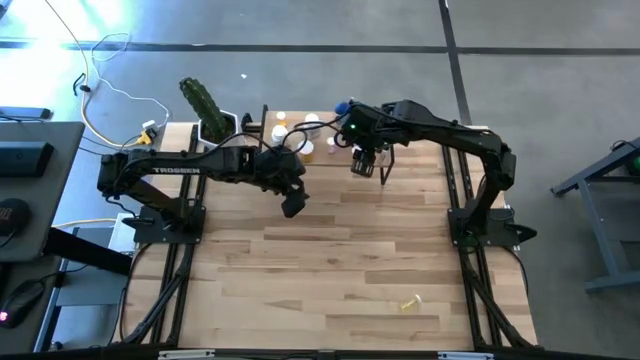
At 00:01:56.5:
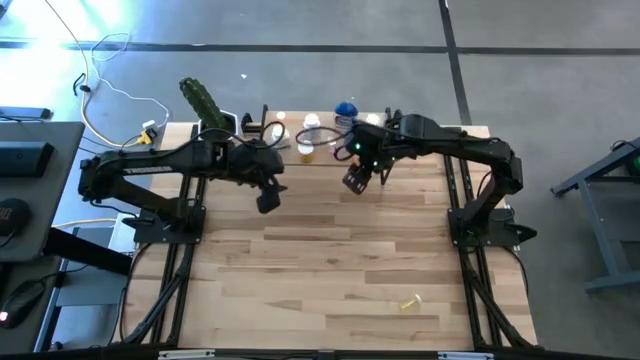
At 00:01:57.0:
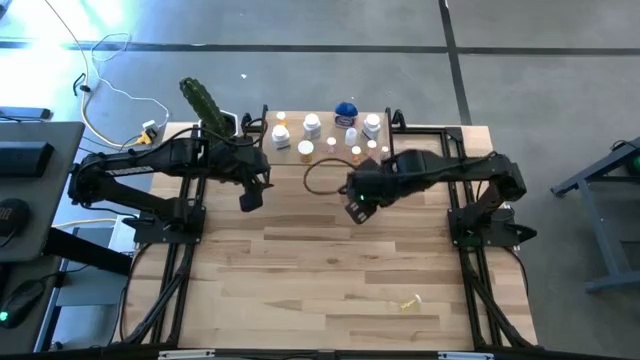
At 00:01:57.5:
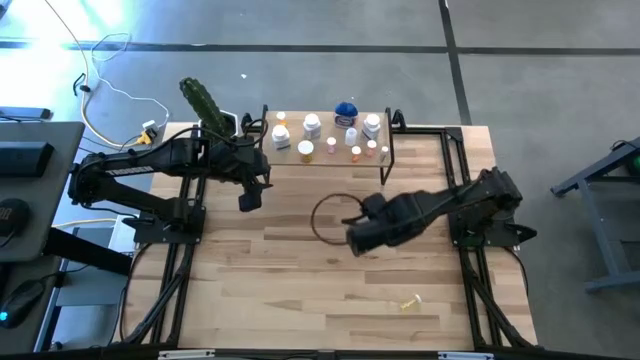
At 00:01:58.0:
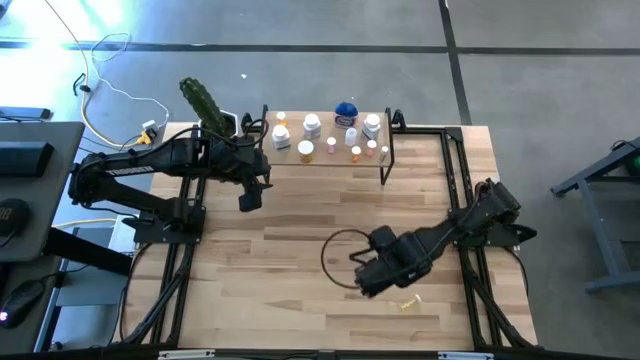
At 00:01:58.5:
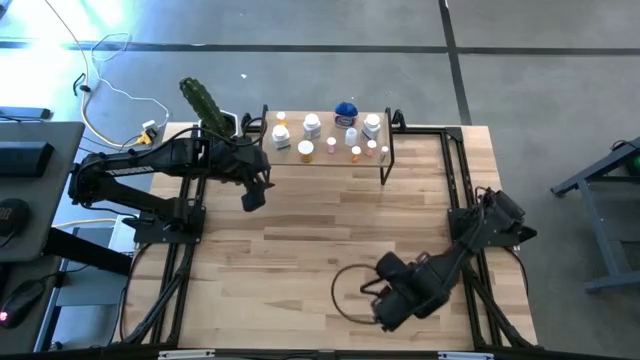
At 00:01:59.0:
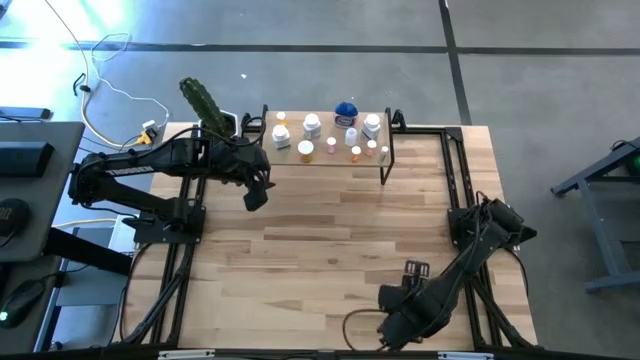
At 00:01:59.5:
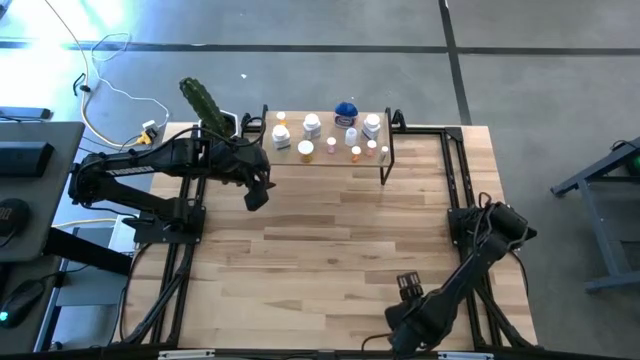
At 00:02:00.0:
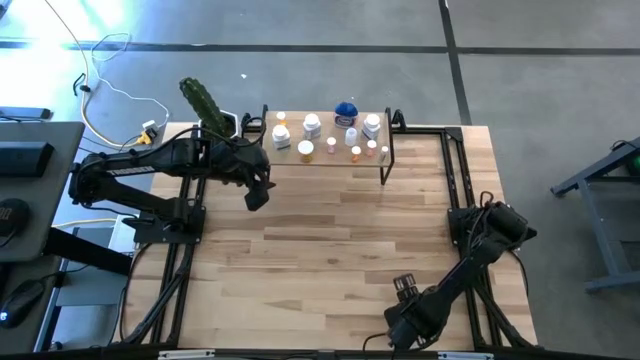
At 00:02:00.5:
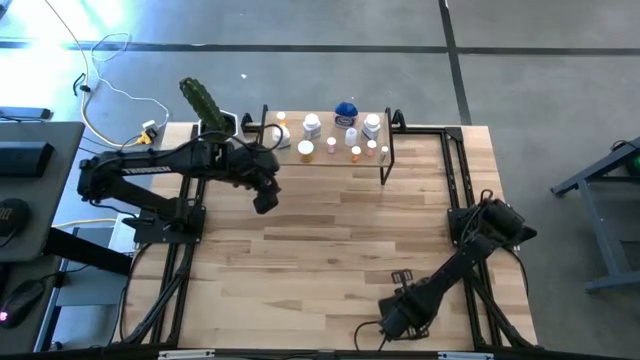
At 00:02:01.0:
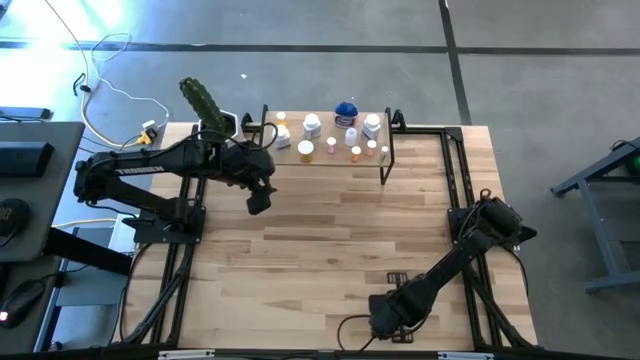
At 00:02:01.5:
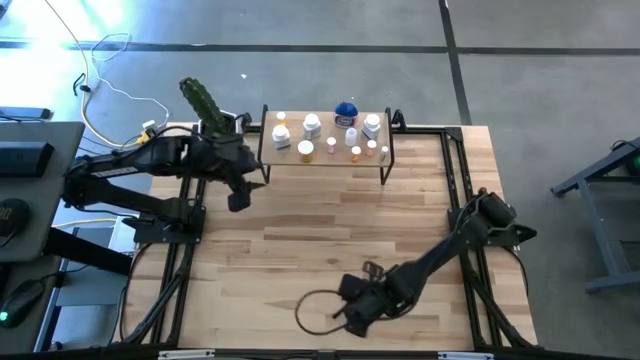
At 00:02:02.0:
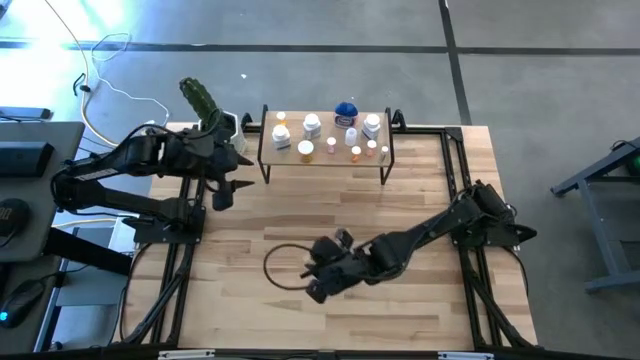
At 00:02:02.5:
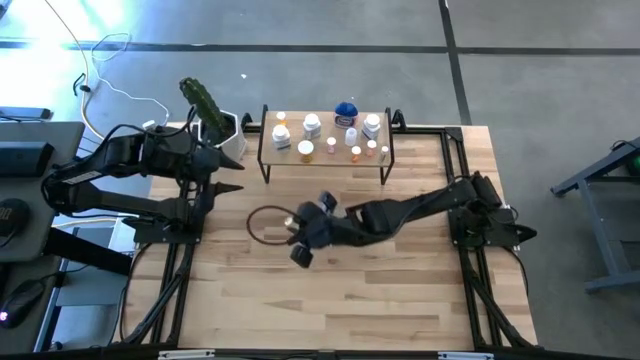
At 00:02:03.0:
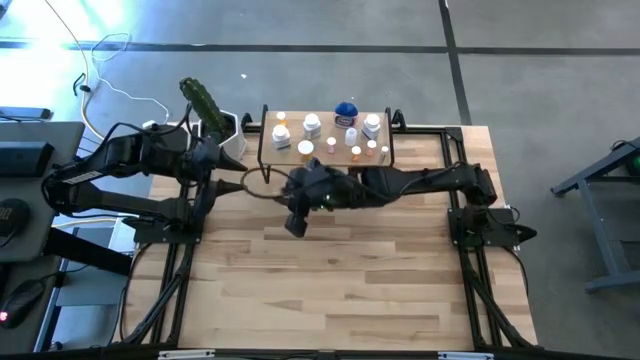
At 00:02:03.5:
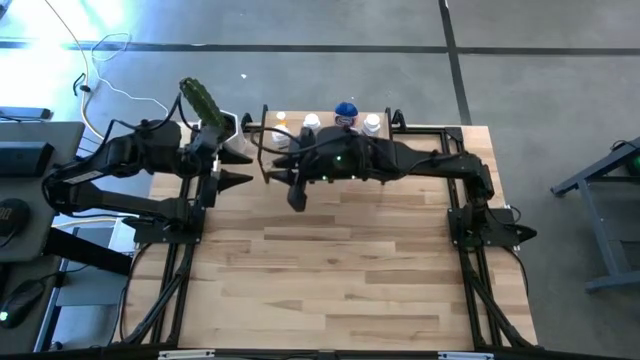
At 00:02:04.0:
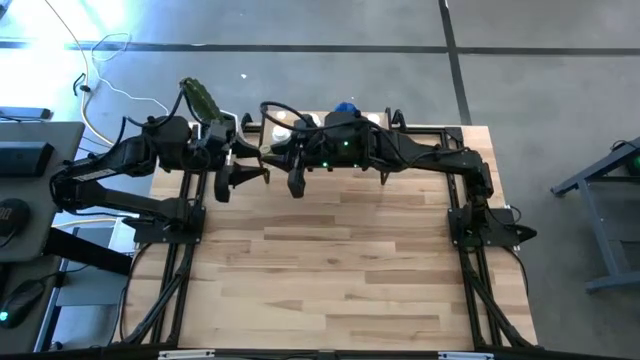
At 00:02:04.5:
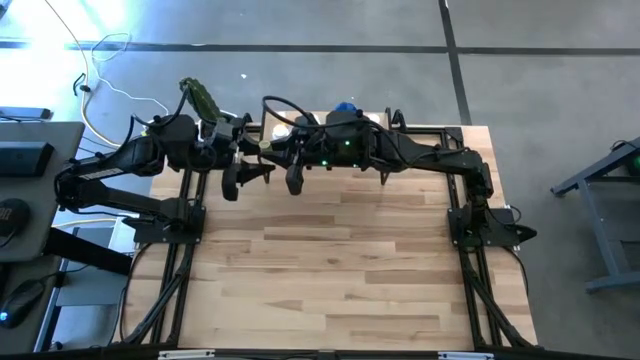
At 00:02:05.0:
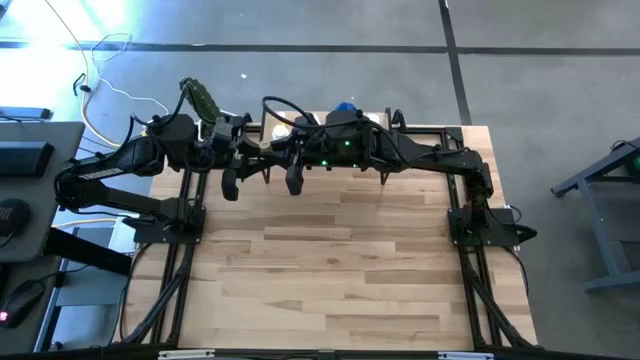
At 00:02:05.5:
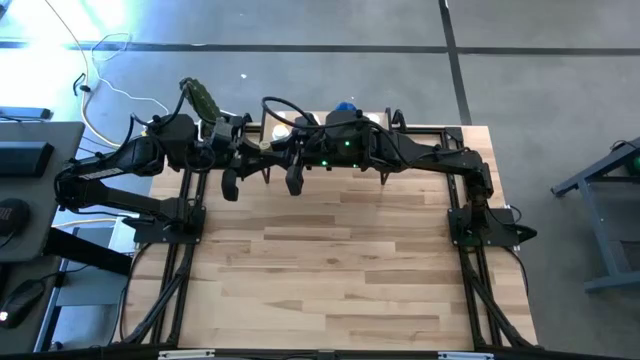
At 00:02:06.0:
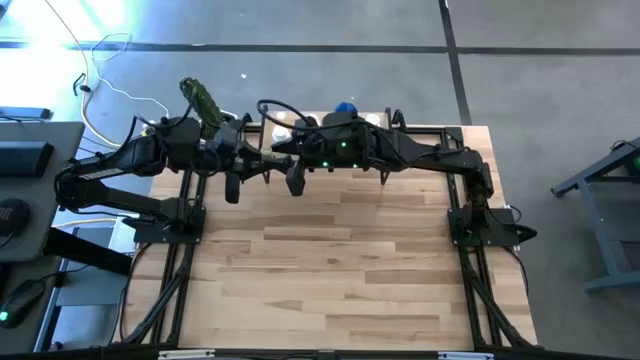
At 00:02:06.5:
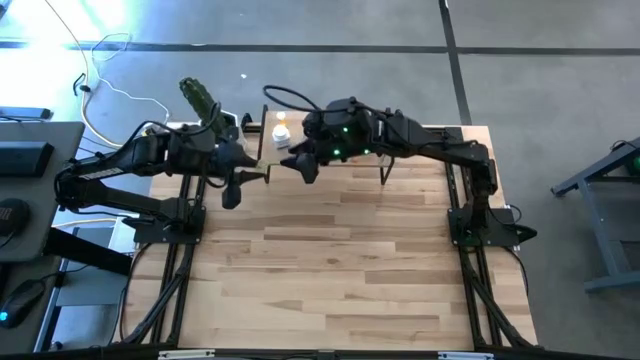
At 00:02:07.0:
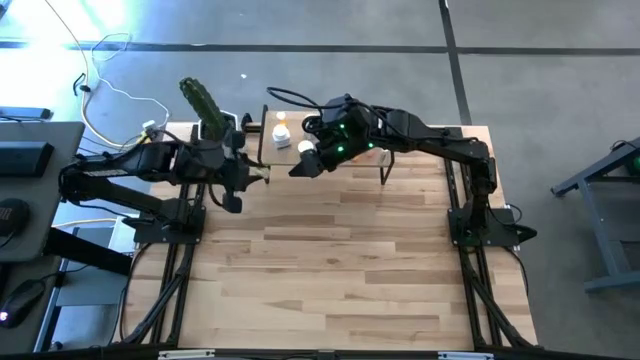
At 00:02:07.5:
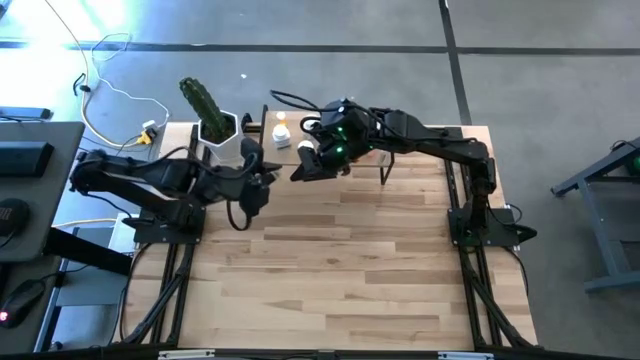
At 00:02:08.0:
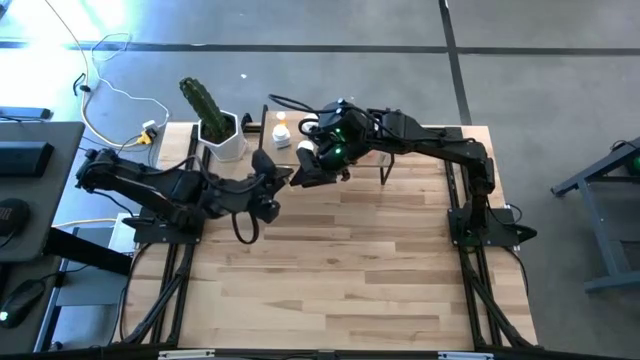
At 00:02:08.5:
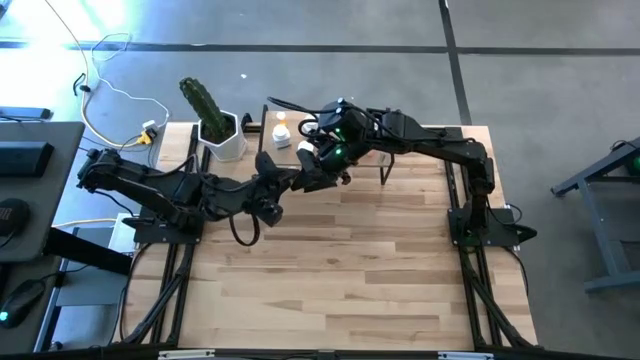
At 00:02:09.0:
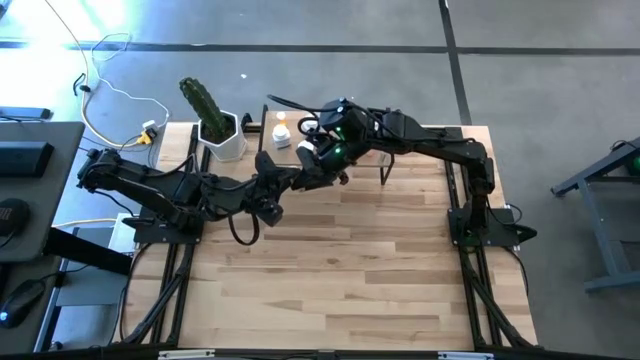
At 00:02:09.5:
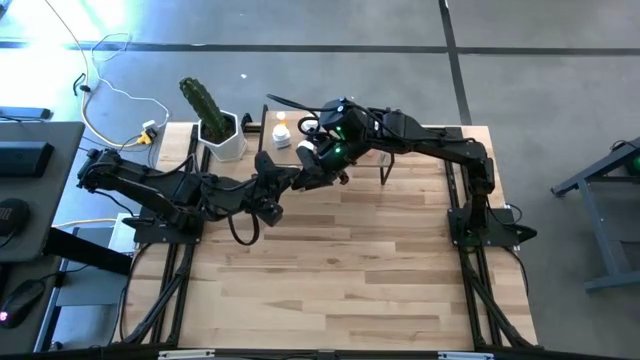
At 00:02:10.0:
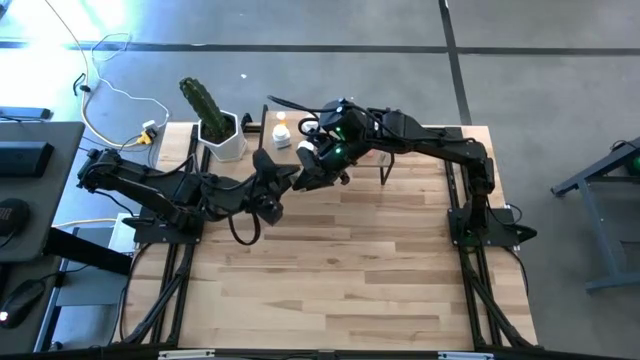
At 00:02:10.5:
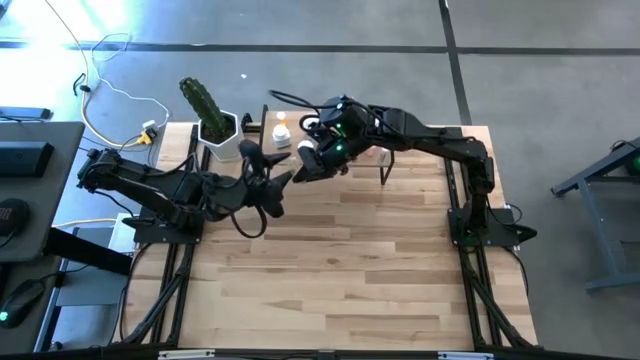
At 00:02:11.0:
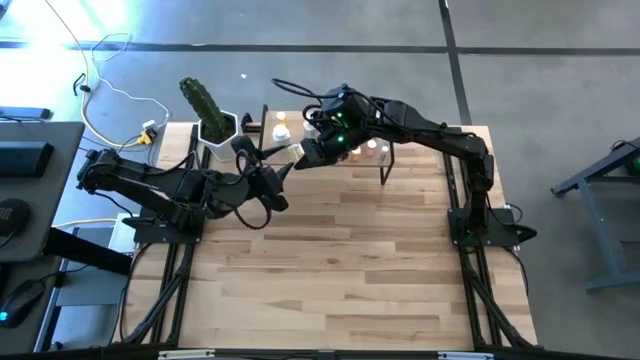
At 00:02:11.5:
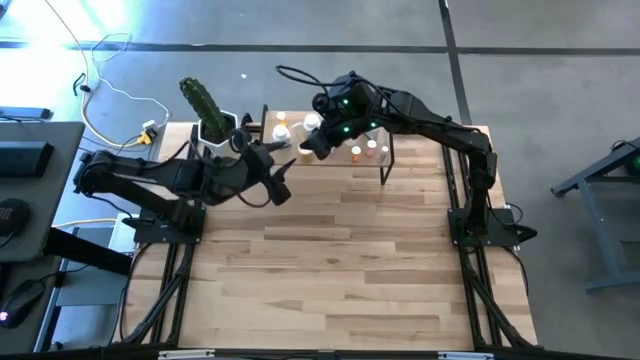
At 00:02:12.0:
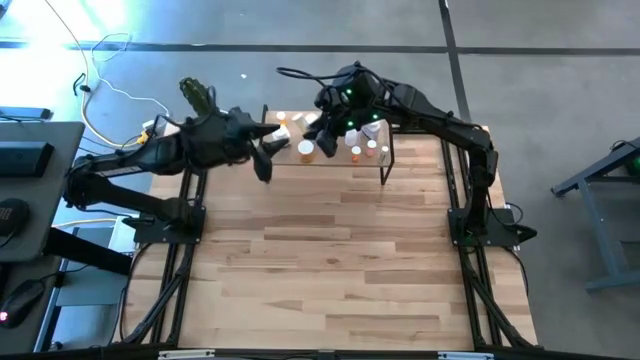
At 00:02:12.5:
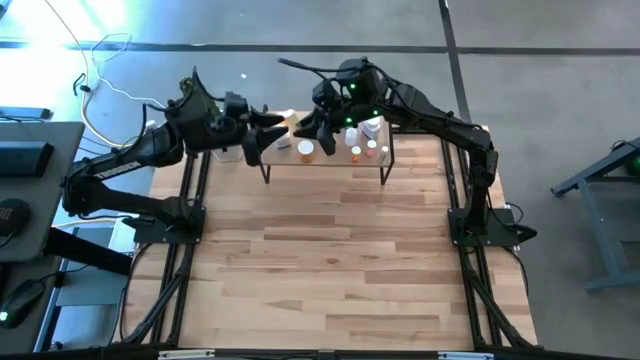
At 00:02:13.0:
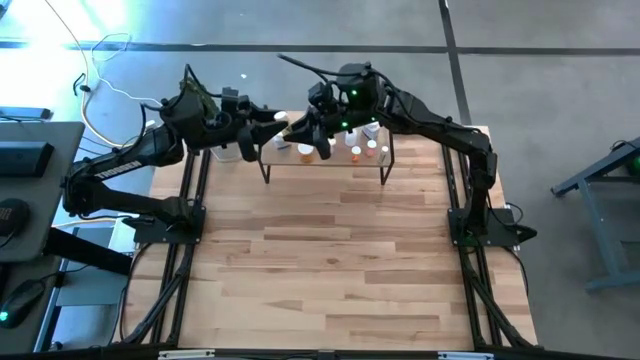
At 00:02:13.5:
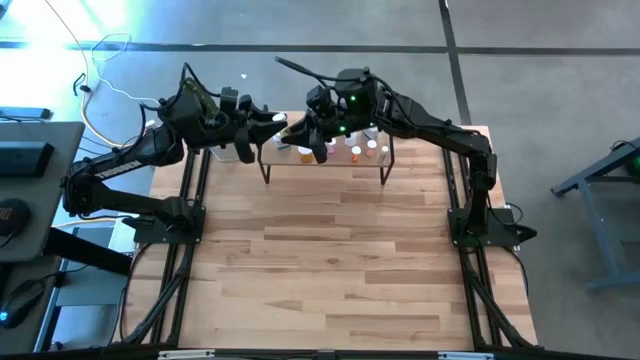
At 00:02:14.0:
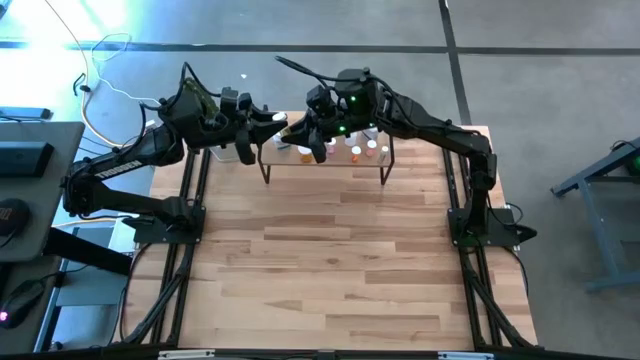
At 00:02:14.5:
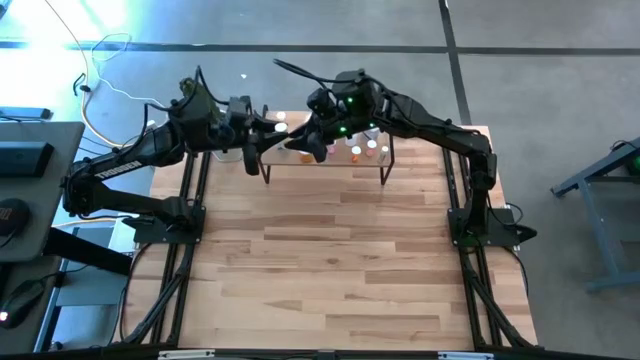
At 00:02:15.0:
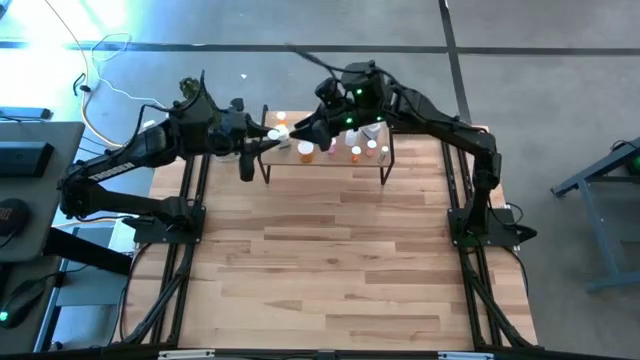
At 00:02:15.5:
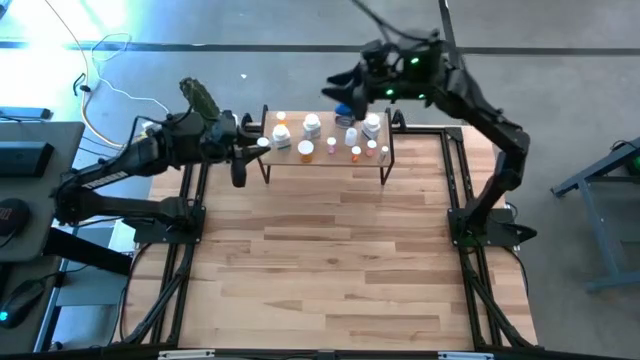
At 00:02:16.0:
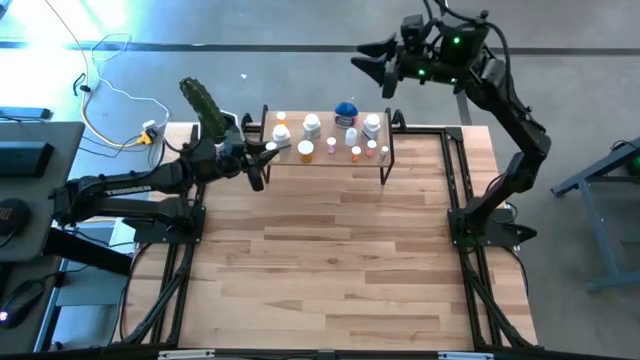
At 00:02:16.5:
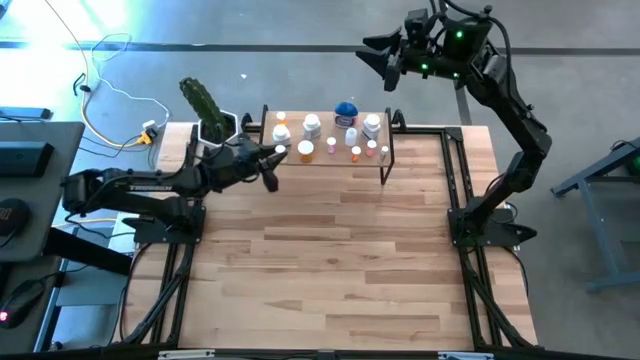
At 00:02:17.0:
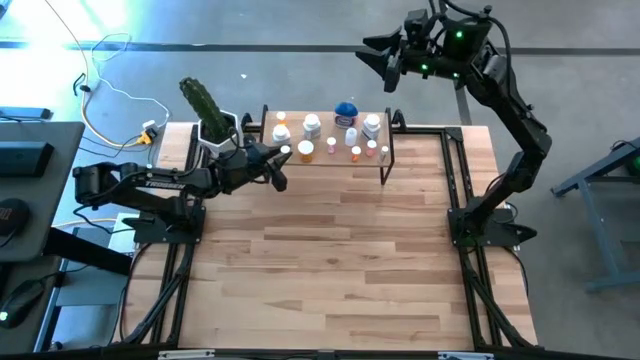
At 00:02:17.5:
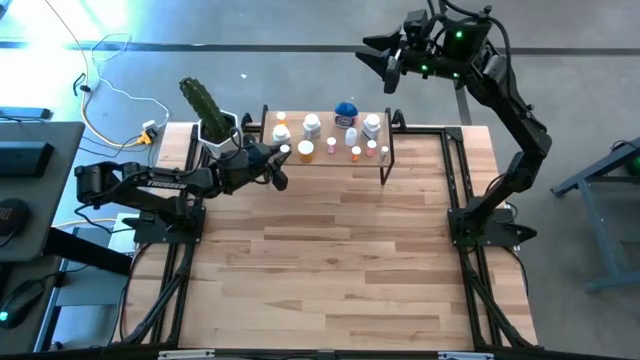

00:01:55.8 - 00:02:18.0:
Task: Pick and place medicine bottles onto shelf by color
Put the yellow pill bottle on the shelf
